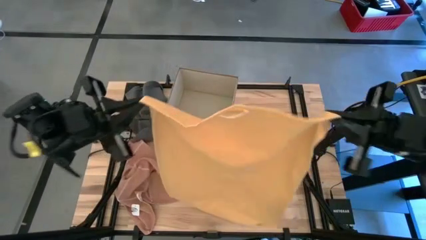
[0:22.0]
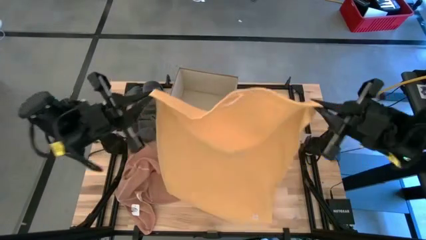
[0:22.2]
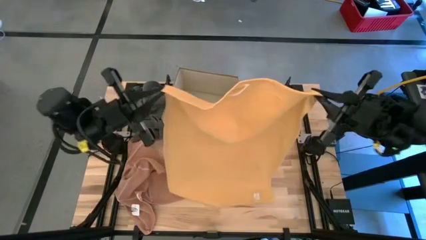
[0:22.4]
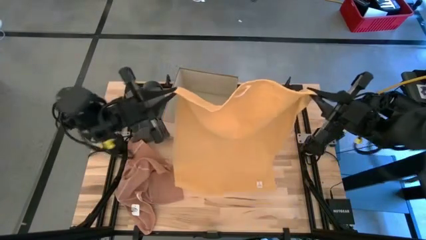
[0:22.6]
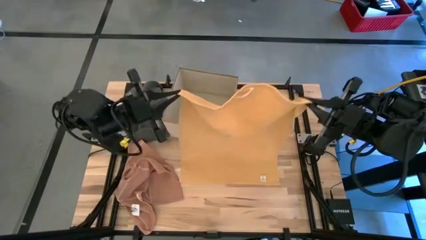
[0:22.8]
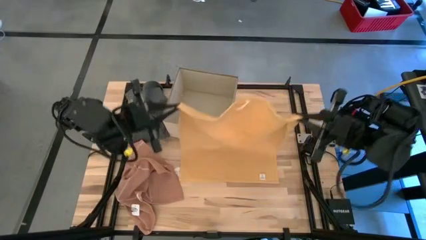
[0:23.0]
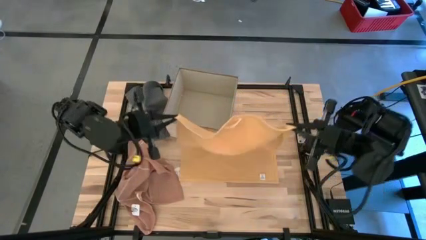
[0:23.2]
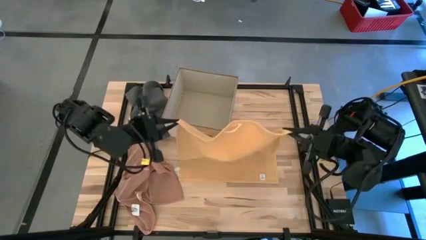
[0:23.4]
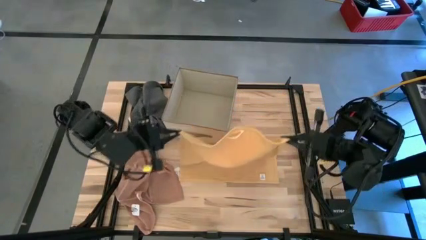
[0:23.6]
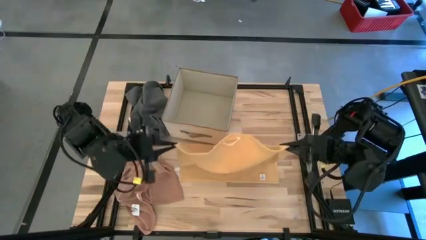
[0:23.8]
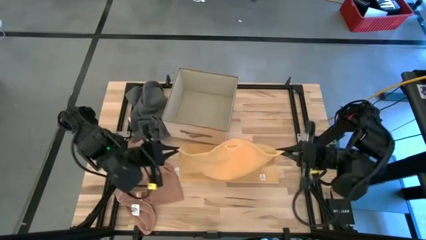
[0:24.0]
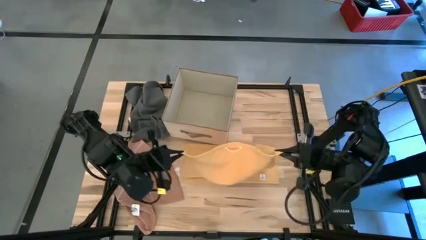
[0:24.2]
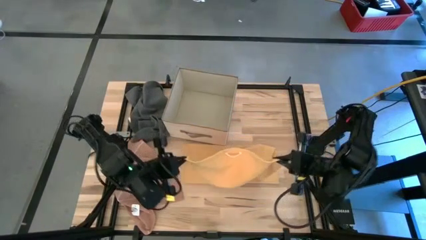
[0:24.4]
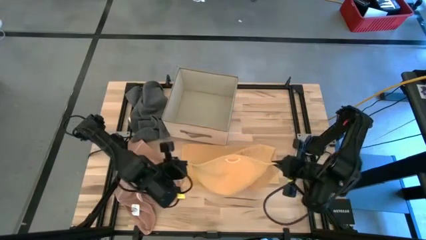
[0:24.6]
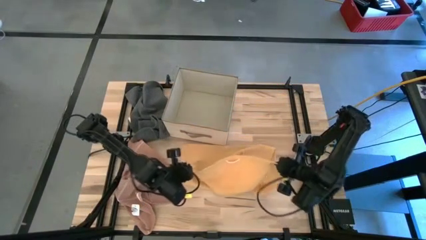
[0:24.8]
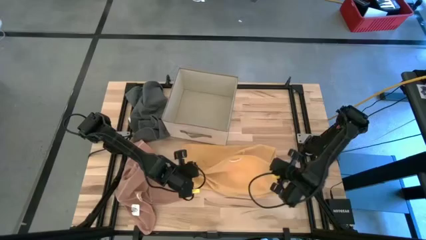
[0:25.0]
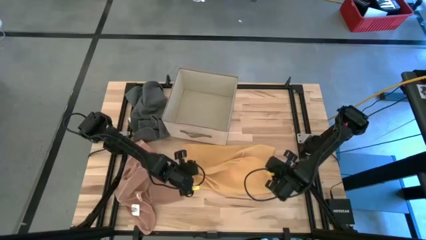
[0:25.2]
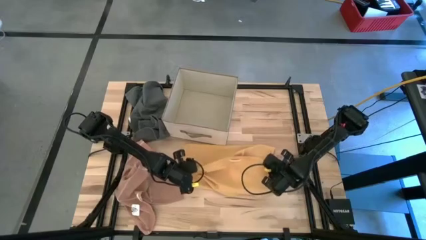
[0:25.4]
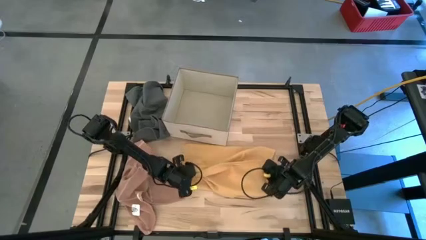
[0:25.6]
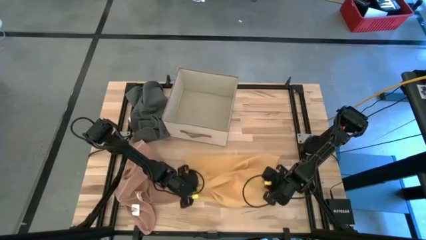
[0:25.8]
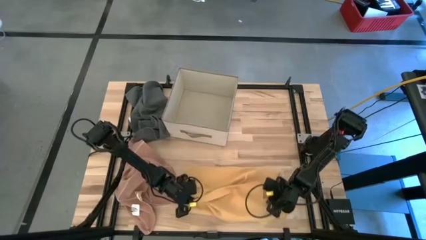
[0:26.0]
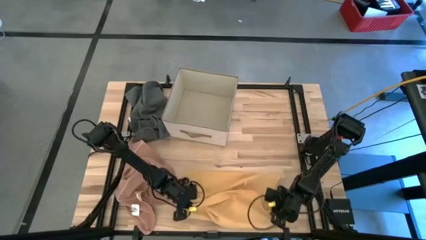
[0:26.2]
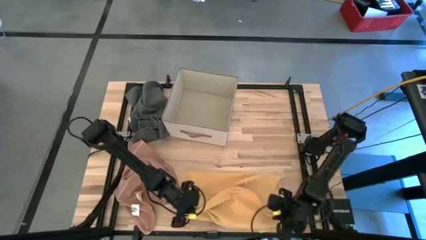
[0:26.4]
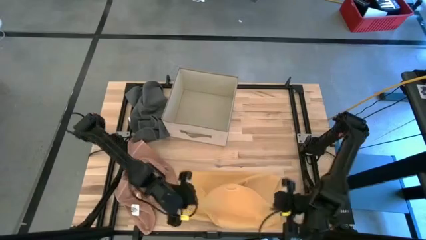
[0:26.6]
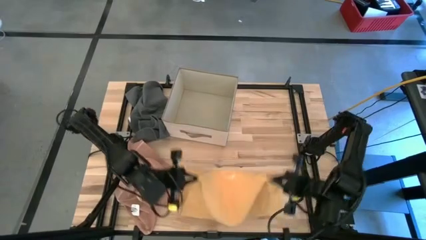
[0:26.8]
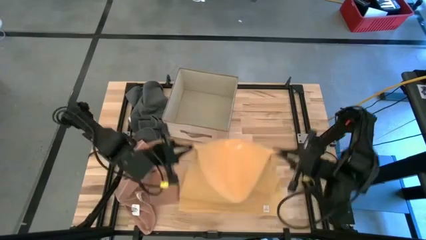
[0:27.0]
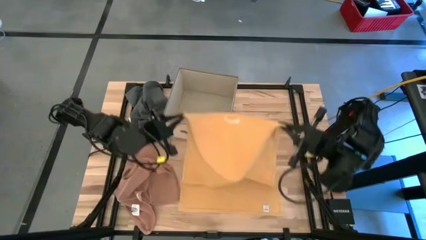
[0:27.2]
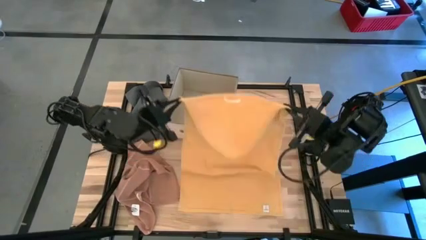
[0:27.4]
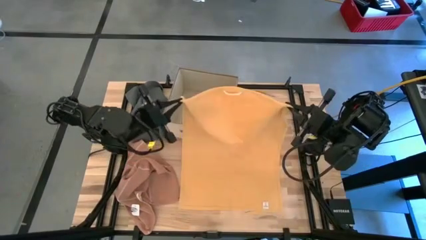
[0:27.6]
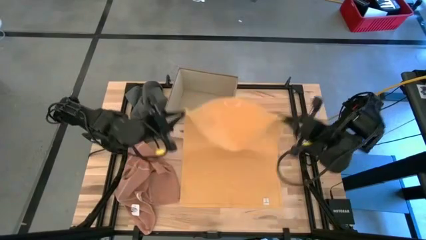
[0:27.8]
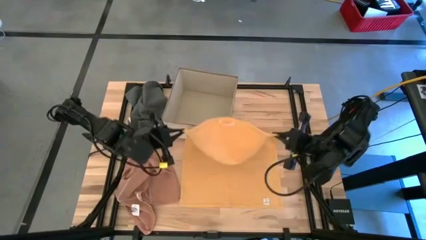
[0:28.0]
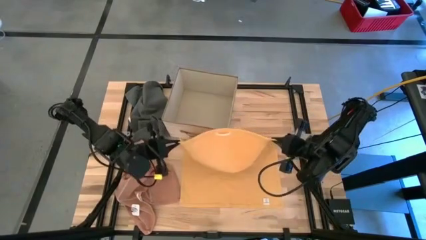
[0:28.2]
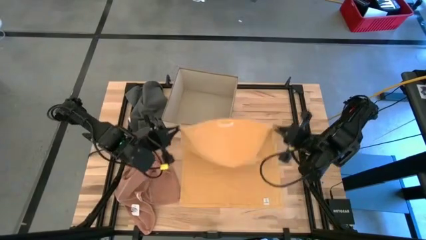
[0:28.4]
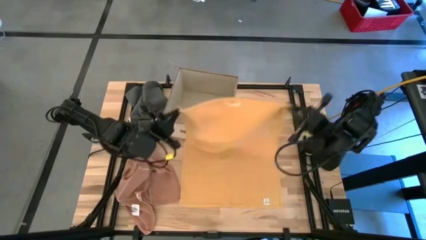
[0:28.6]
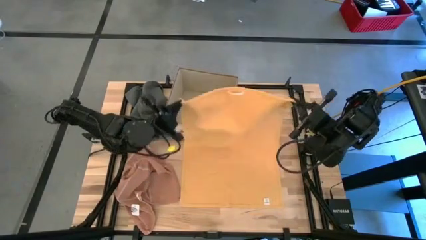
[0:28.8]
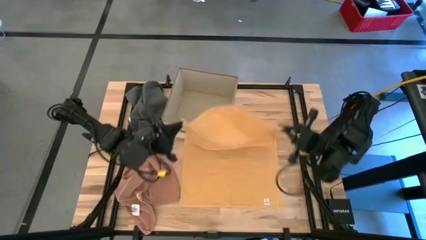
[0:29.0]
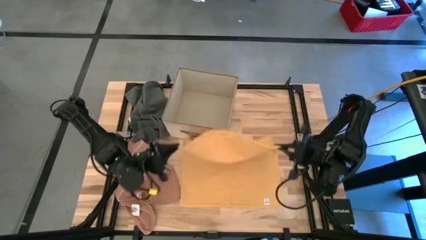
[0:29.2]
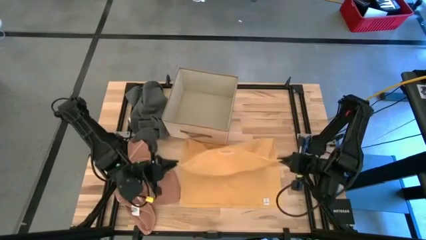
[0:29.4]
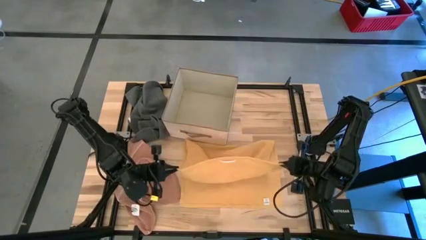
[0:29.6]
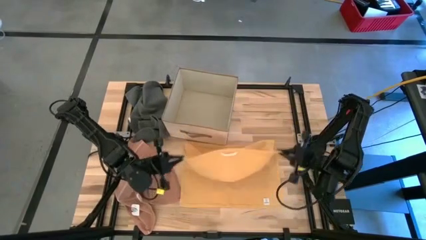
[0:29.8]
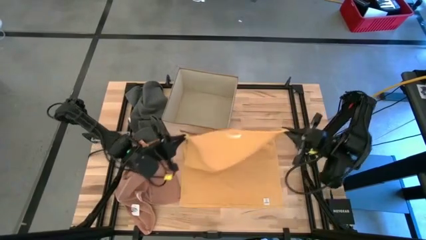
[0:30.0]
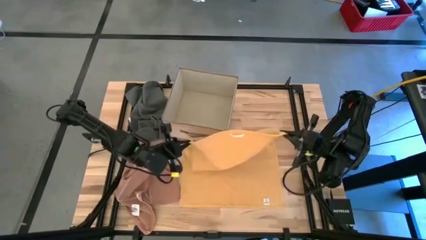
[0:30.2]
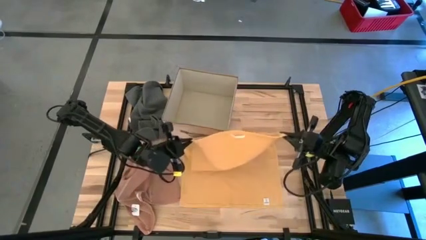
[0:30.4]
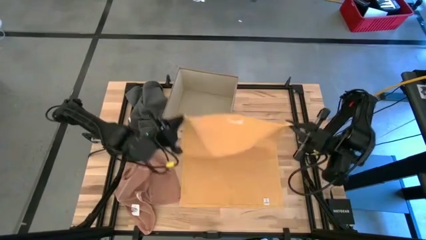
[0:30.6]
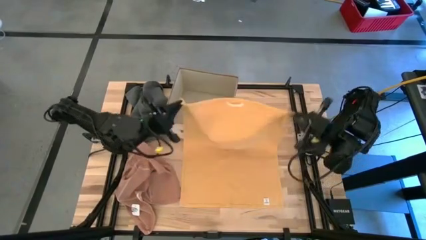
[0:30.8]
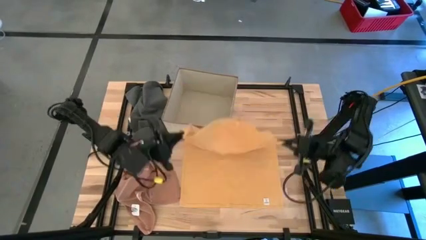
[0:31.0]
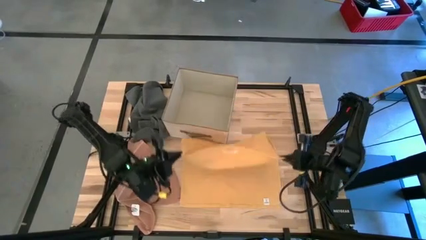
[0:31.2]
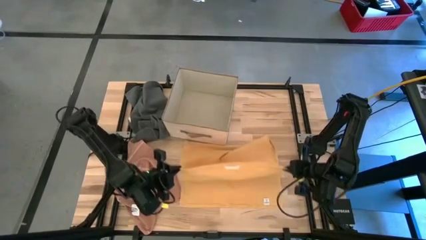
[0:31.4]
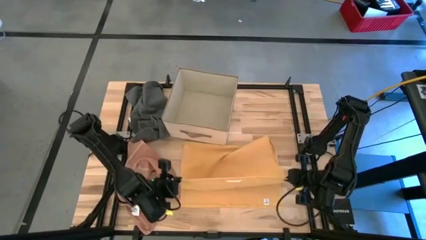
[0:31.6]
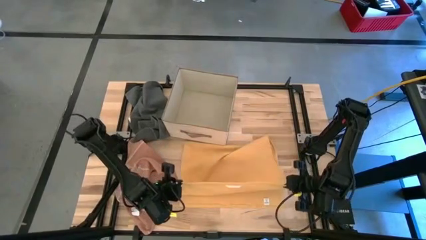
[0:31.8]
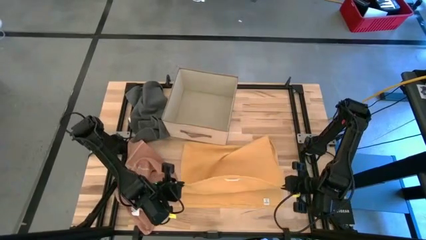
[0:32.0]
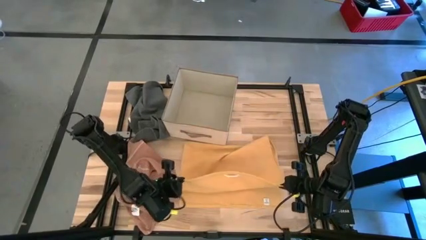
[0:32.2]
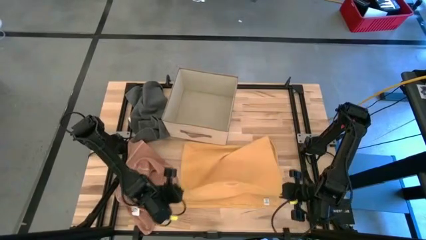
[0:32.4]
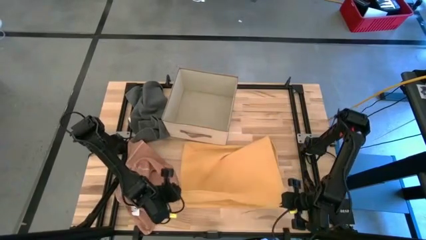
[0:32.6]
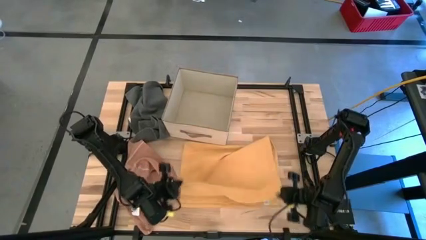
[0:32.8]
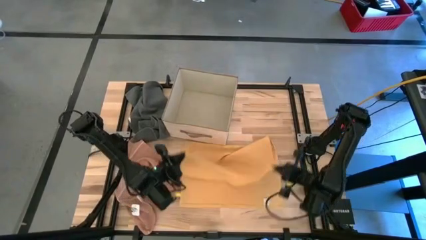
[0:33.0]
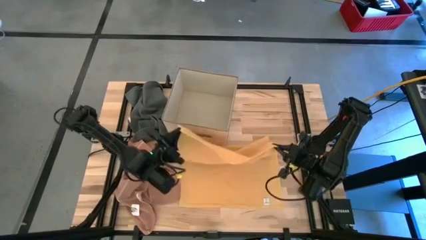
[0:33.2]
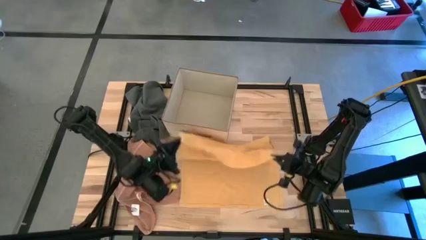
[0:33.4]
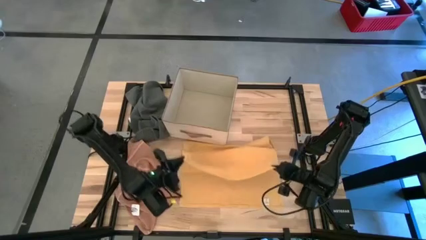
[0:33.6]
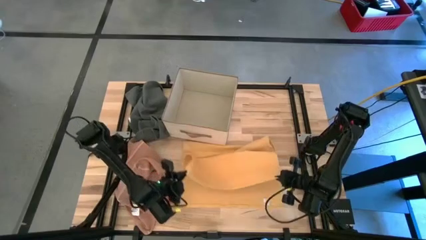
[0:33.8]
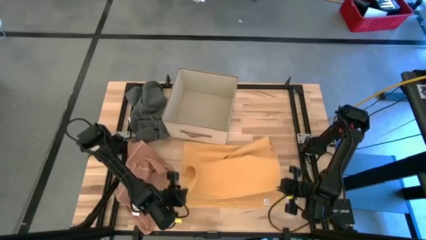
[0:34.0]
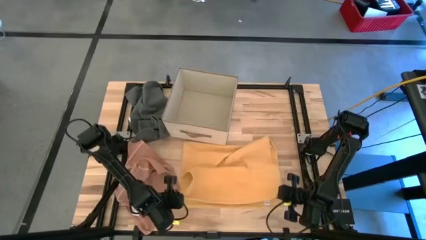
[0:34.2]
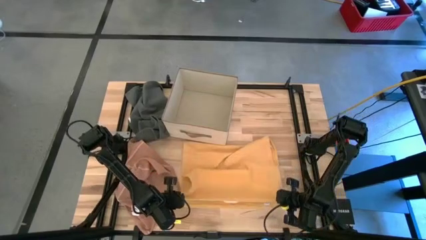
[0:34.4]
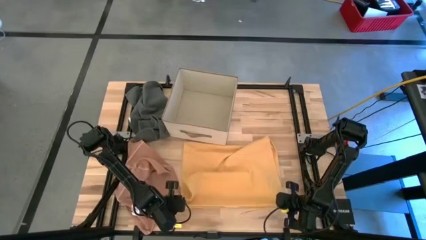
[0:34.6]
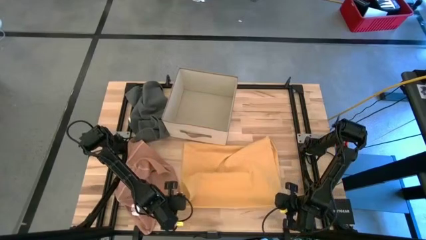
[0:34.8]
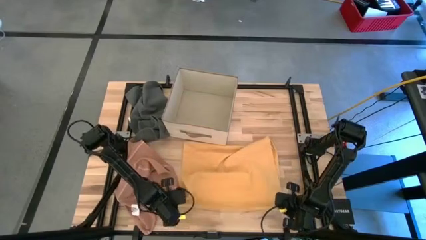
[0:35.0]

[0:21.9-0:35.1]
Task: Fold towel
Fold the yellow towel

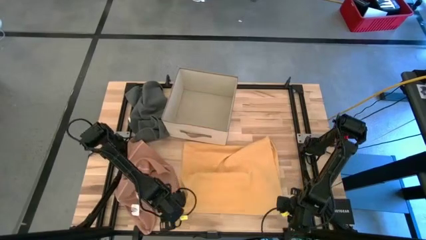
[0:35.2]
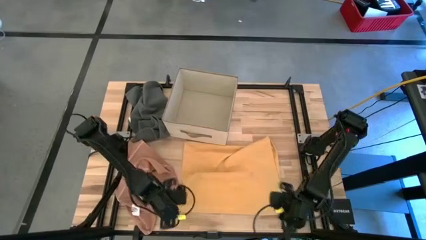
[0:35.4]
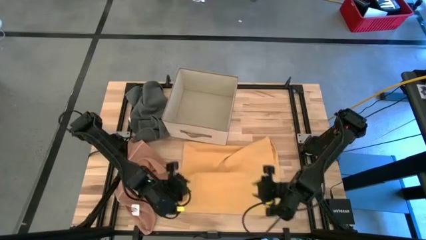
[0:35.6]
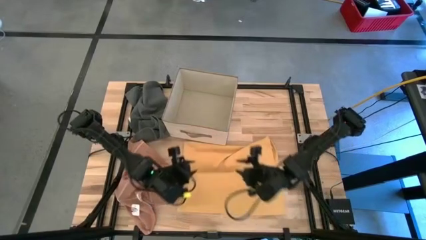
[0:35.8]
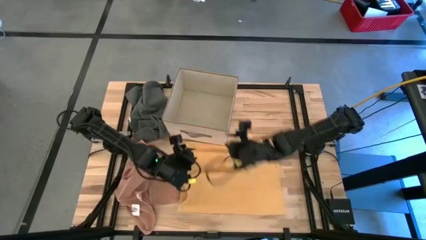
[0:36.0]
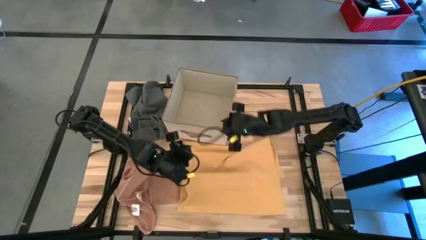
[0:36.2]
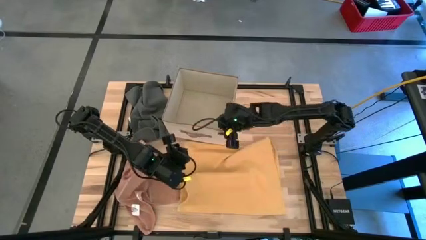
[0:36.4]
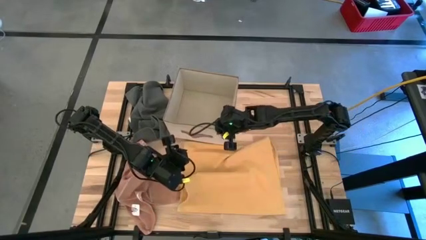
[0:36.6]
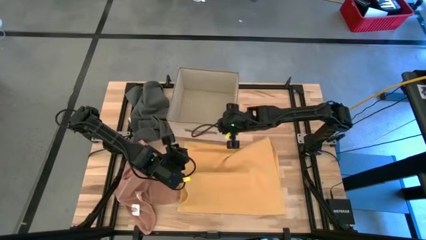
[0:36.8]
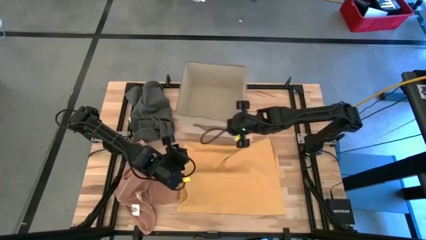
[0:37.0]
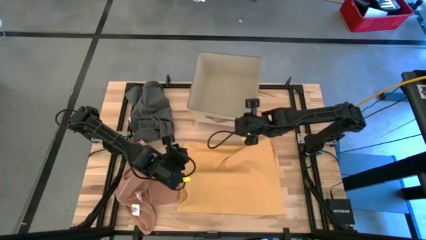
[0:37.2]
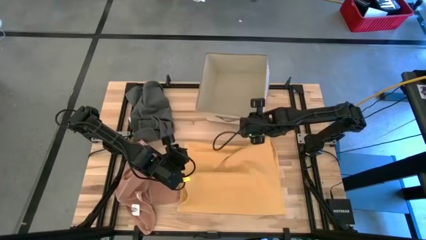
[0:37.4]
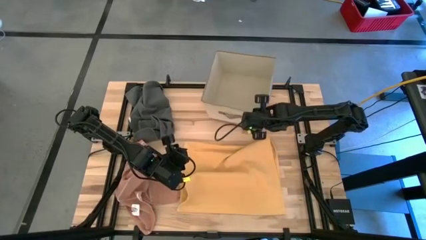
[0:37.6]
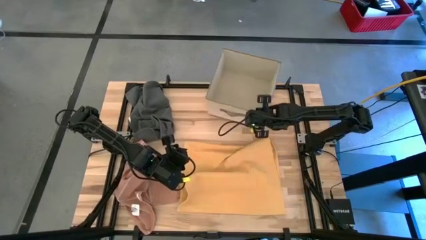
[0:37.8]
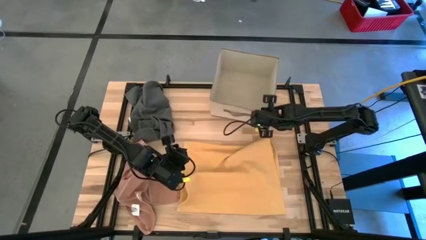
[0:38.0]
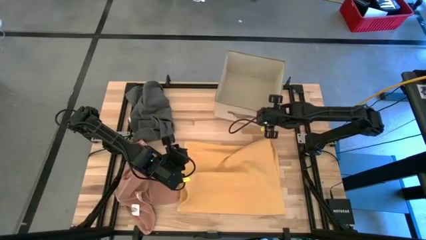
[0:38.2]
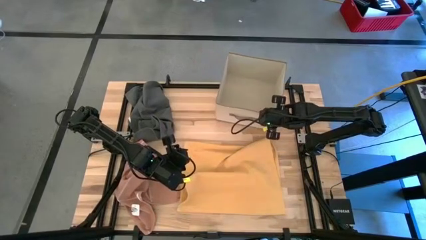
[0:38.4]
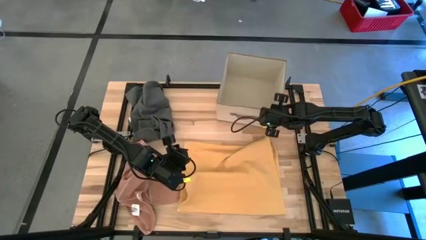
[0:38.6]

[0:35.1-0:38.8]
Adjust the brown laundry organizer
